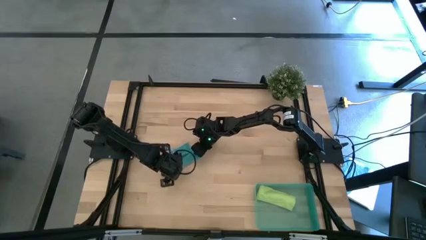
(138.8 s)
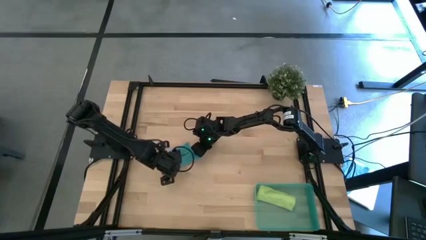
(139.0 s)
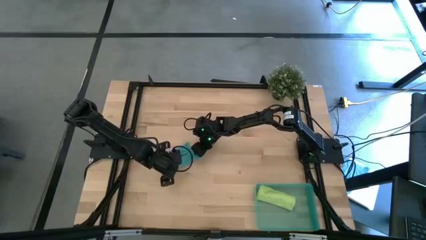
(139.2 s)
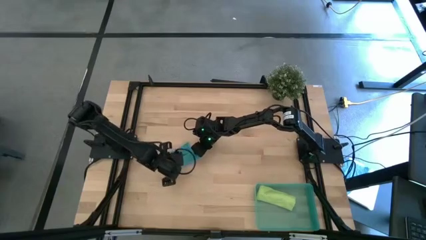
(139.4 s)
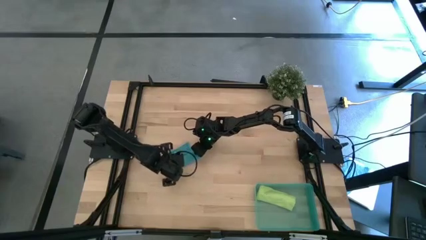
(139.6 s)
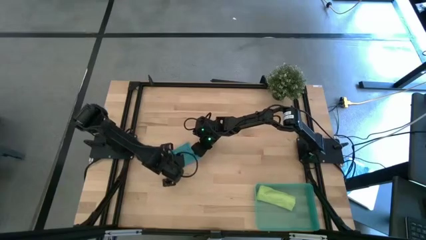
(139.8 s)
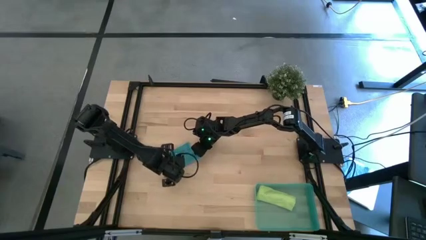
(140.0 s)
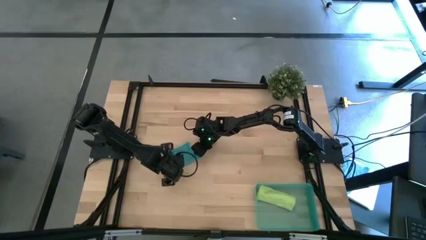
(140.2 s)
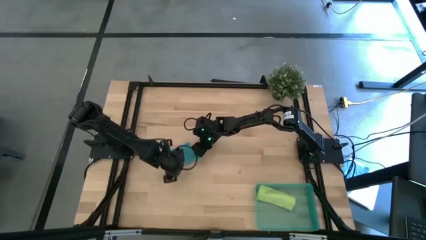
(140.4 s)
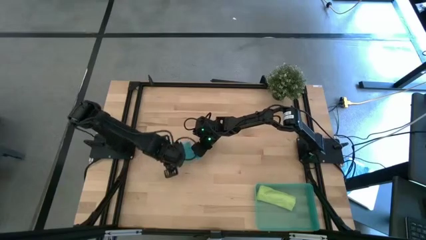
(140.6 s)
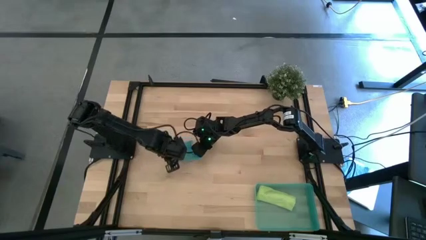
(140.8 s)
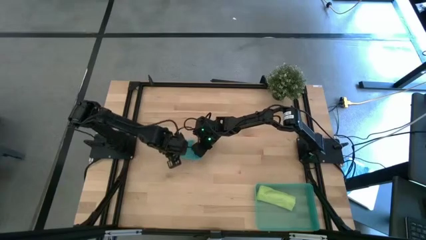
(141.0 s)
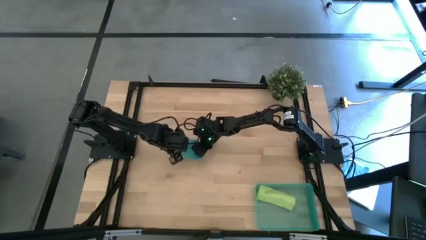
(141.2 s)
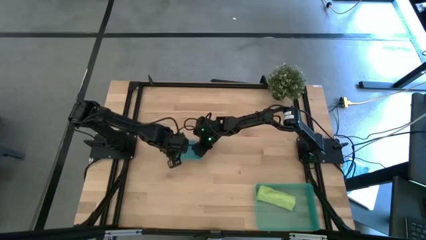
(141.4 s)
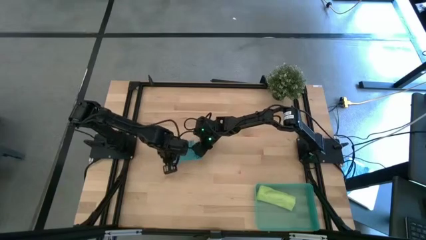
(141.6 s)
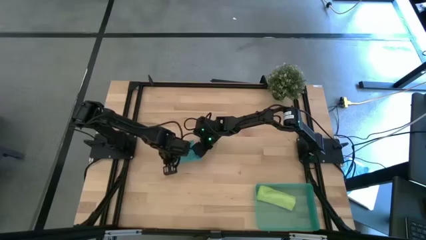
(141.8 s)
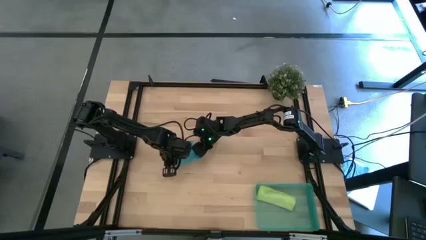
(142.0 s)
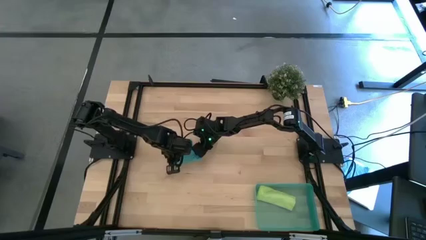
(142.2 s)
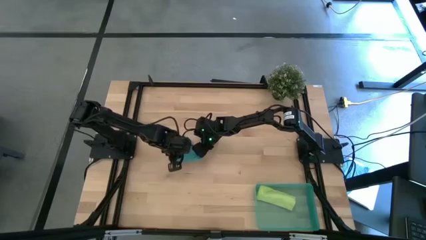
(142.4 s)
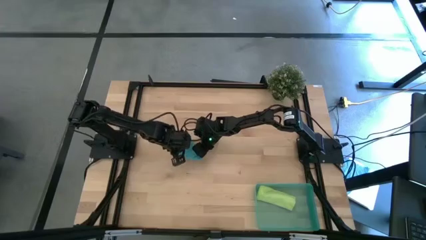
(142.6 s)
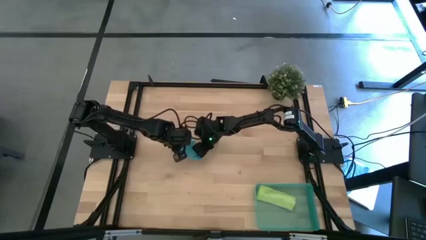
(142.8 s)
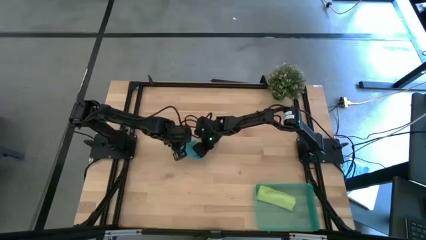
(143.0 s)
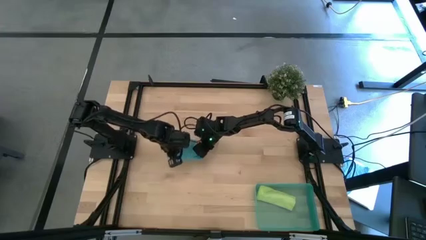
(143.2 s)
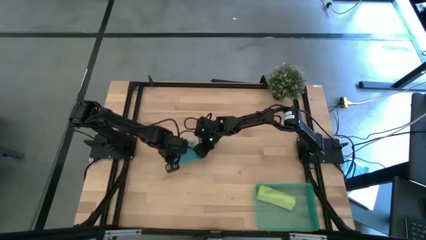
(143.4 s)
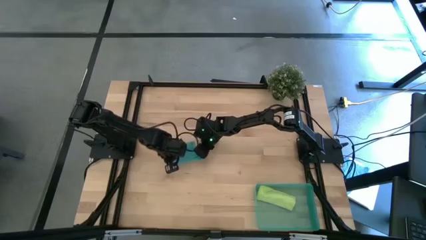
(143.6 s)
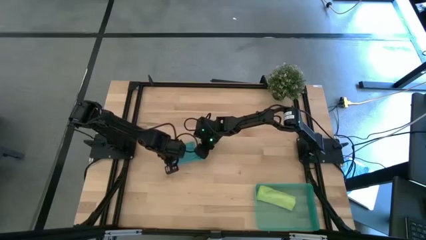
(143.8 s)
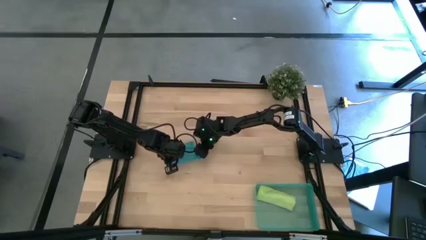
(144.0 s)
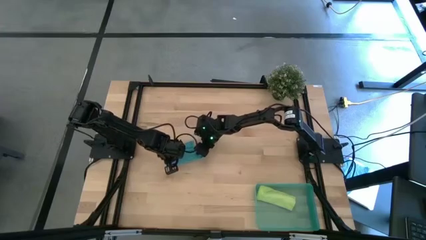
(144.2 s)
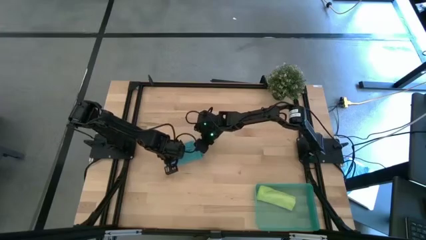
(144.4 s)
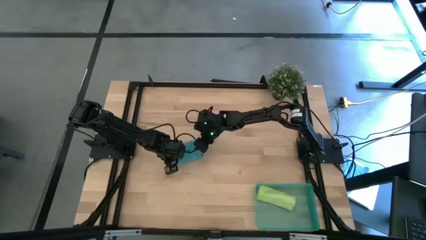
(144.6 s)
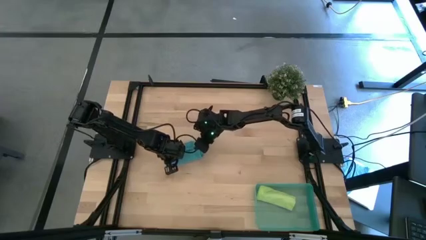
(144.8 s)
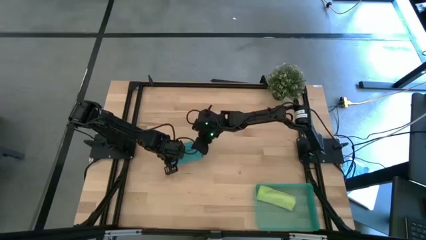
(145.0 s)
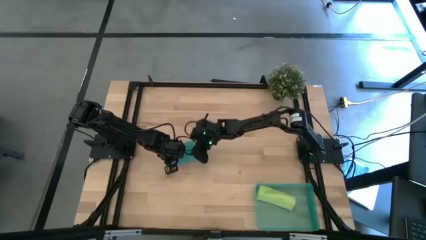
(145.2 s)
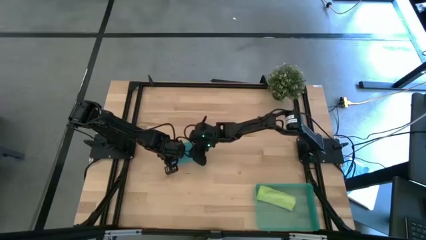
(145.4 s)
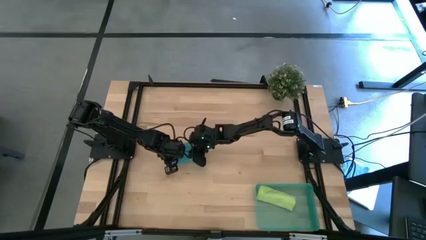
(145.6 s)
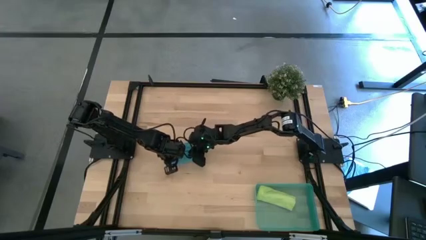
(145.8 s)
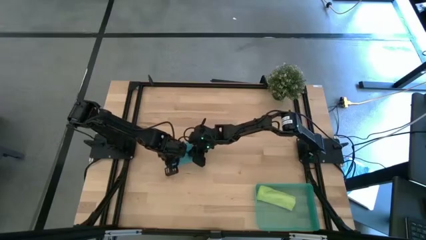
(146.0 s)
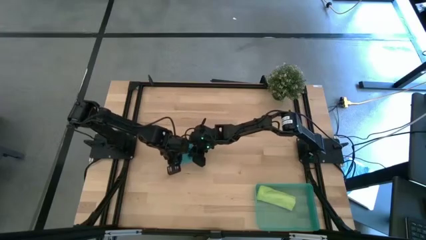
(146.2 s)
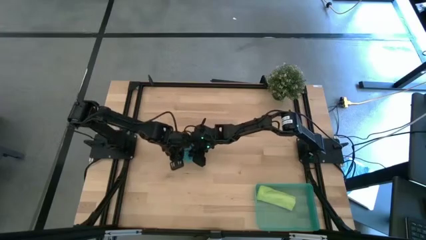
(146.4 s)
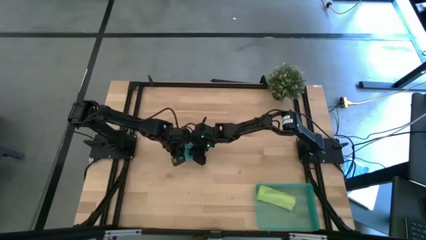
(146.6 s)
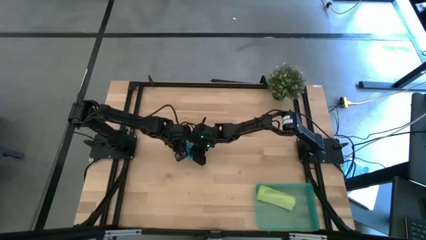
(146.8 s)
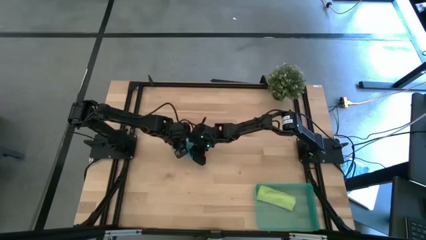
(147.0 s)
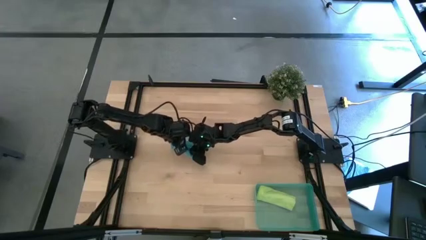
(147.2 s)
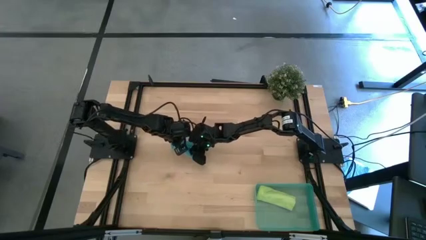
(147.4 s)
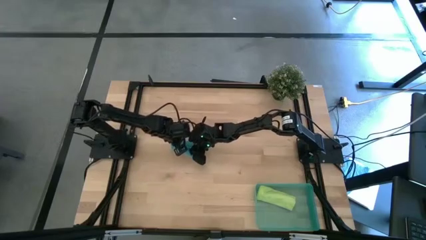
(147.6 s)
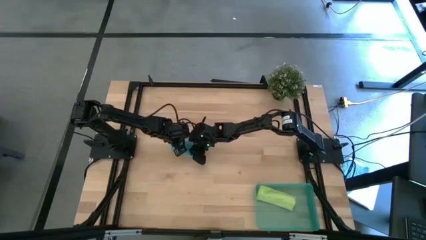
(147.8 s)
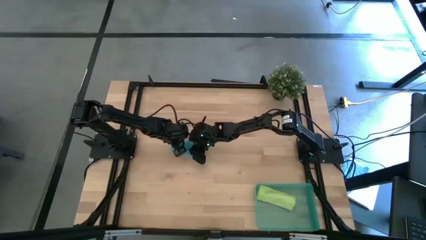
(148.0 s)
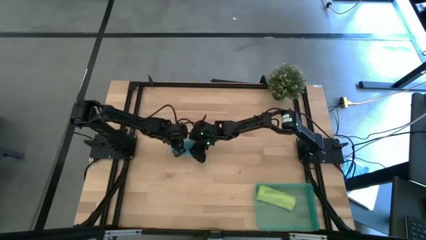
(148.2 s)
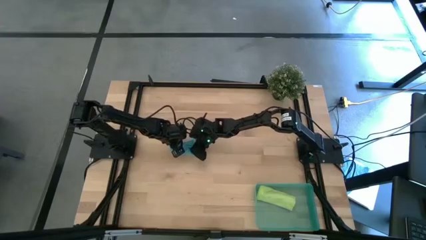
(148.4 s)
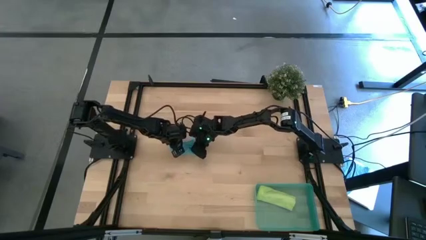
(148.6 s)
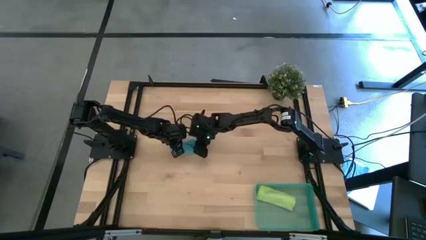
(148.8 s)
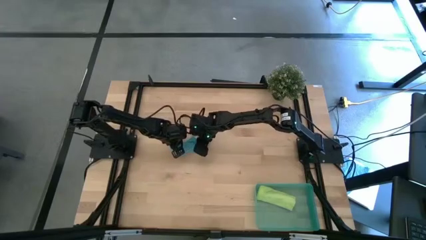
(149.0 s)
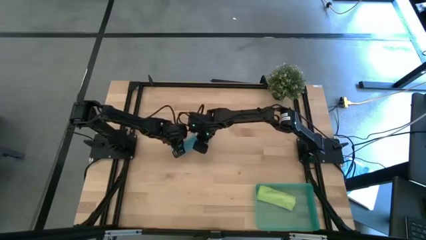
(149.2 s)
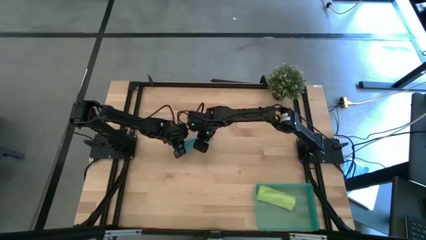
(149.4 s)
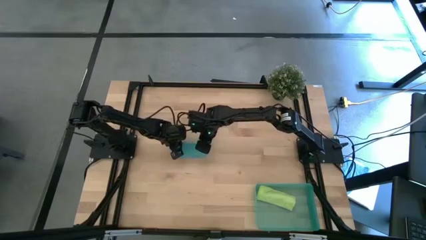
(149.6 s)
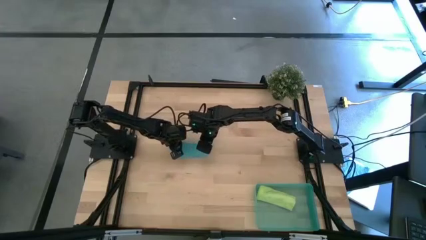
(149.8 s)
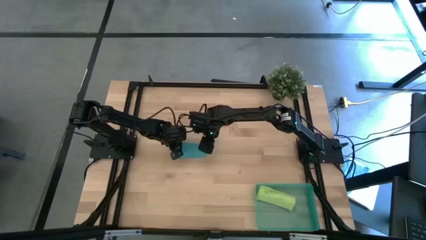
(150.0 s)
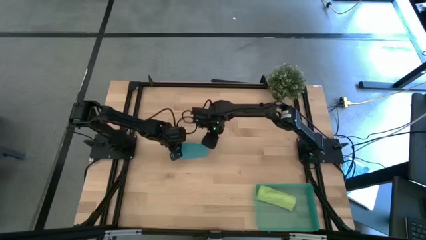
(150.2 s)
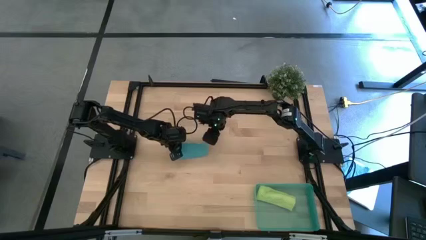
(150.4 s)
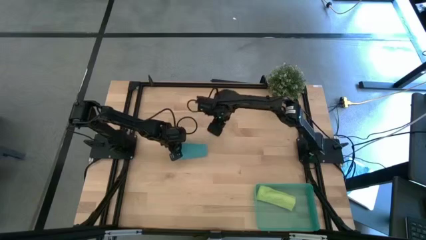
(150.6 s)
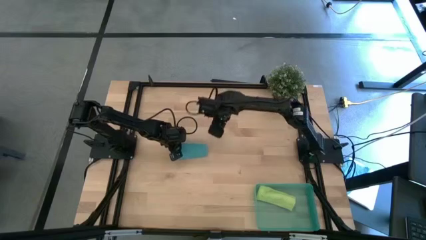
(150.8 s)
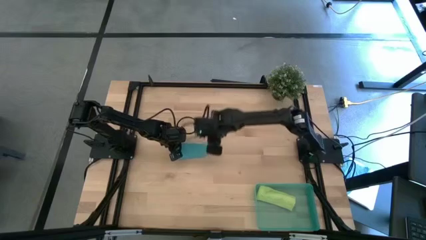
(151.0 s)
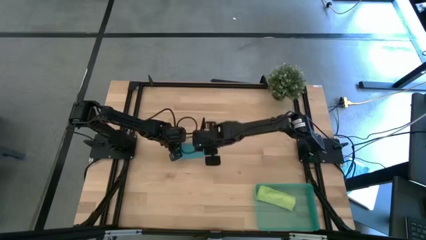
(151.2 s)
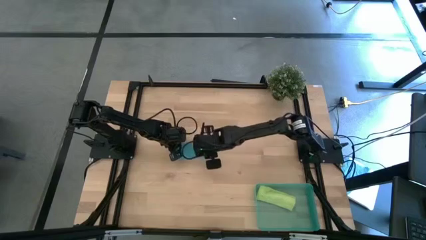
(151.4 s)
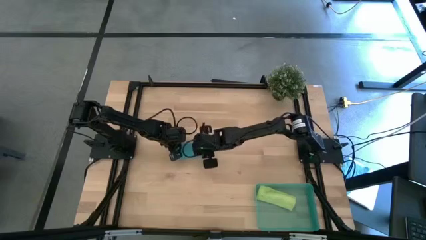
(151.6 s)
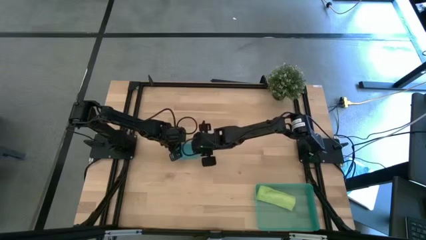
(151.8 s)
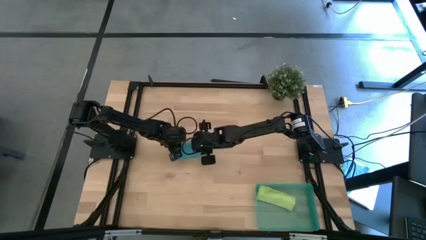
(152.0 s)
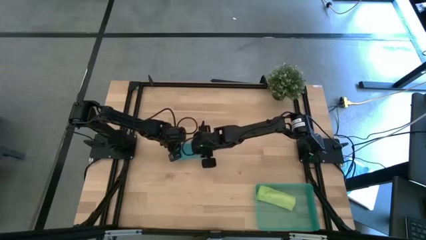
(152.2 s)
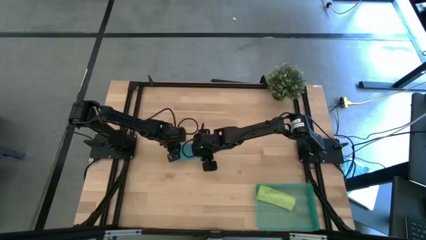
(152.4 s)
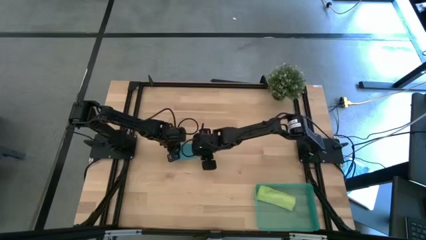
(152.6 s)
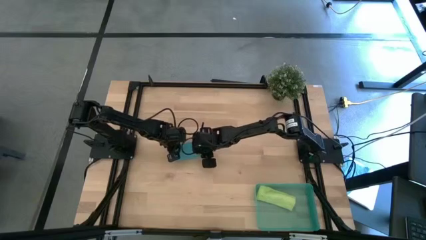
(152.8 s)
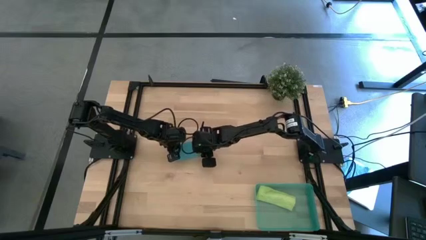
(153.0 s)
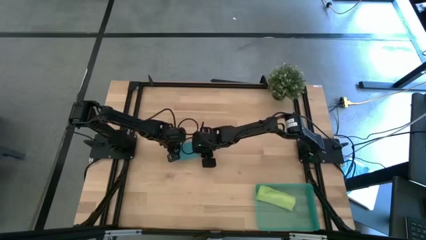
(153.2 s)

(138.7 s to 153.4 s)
Task: Roll microfiber towels into tight, uniform cylinder then place into a basket
Roll the blue microfiber cloth
